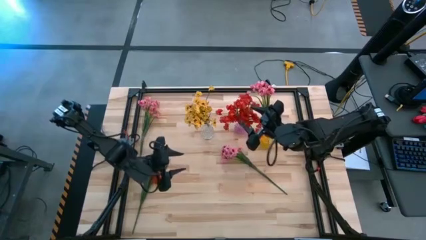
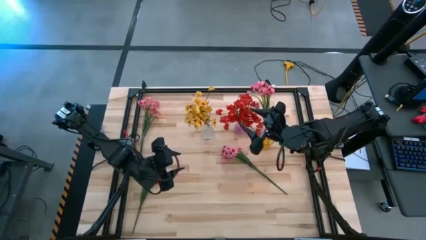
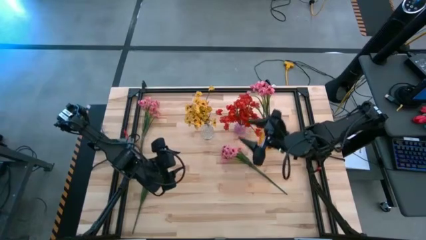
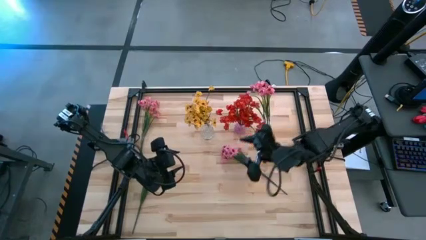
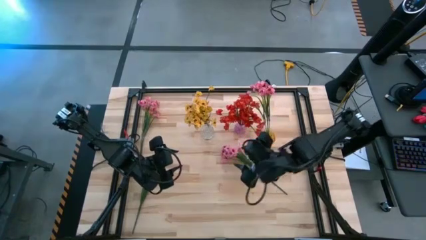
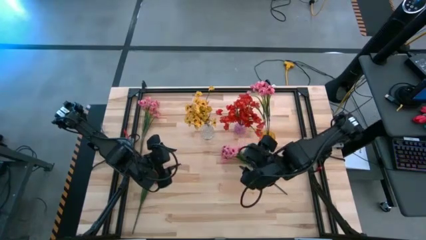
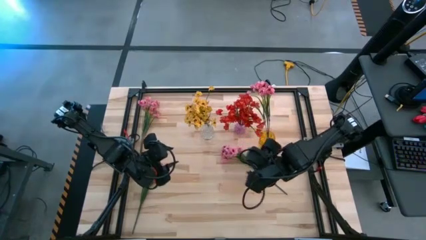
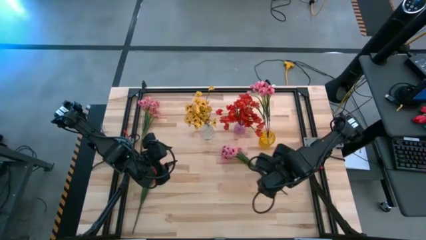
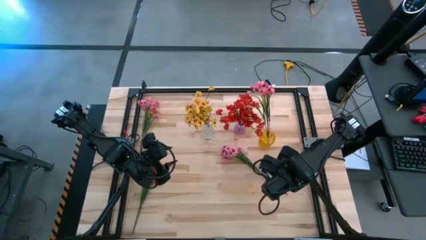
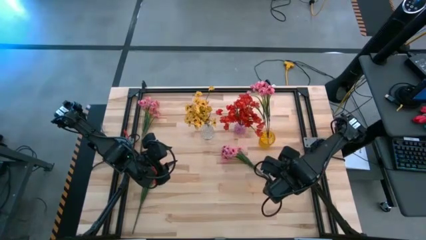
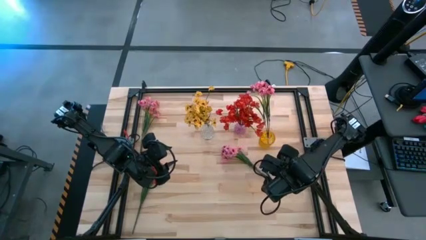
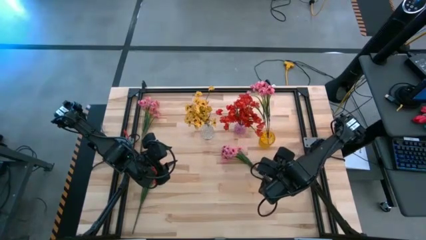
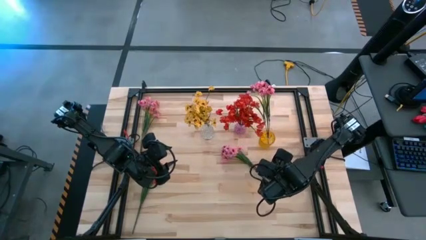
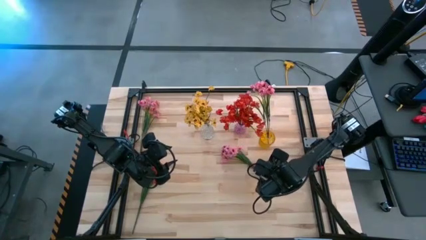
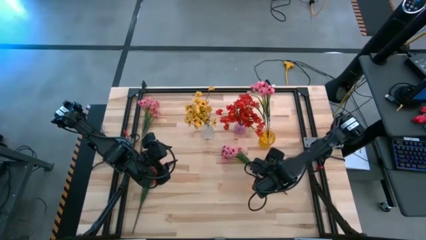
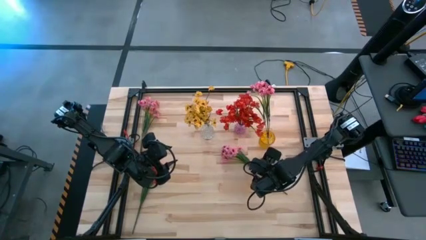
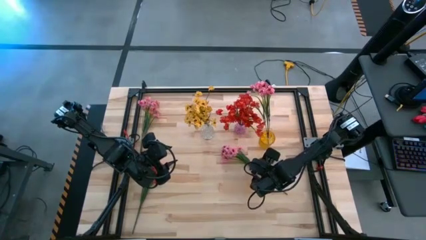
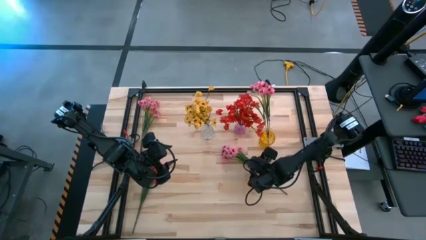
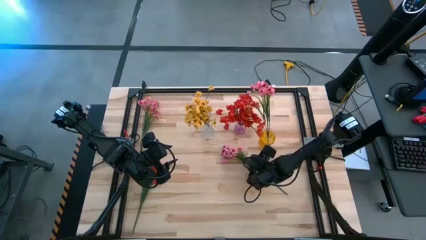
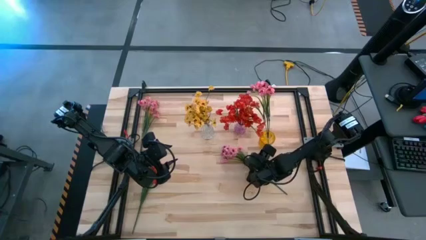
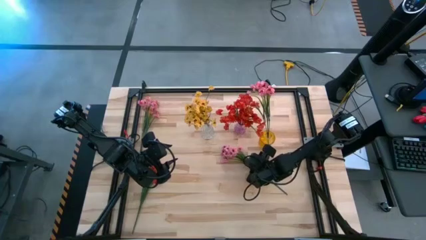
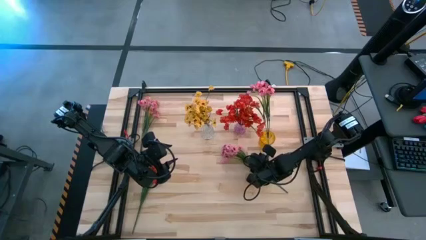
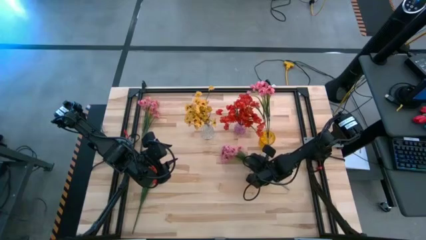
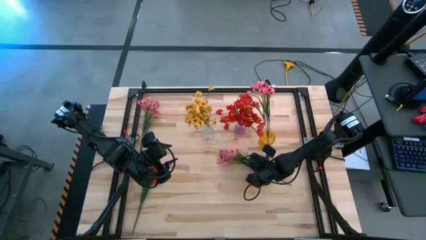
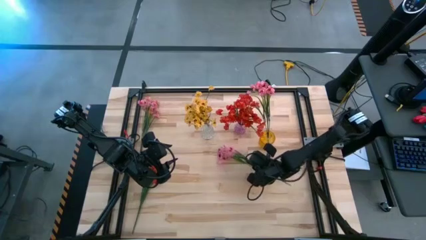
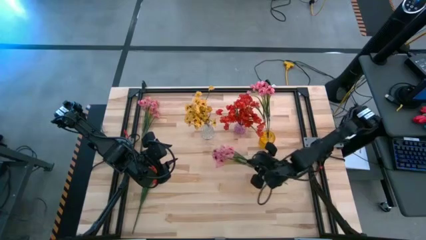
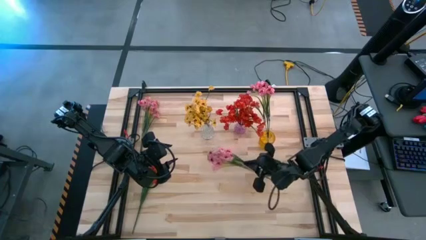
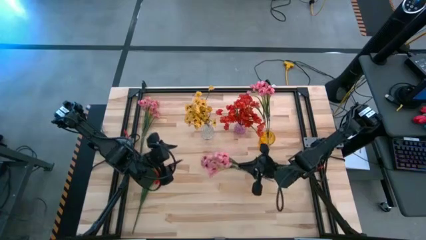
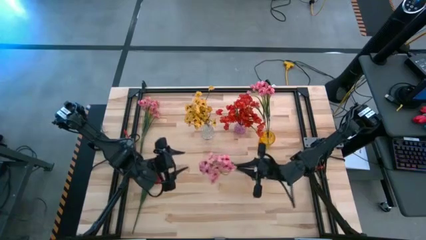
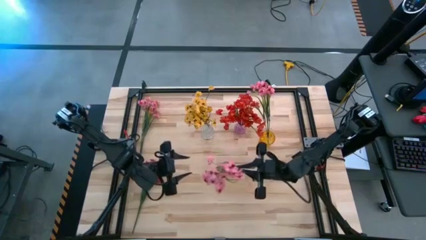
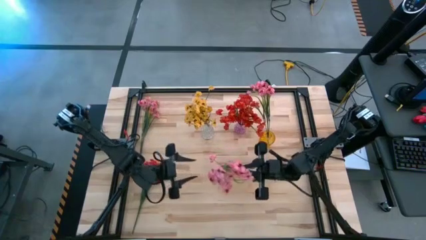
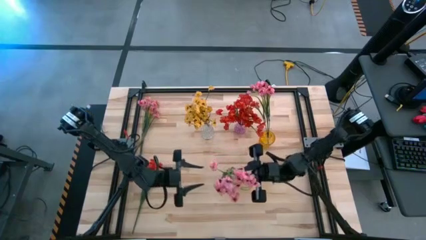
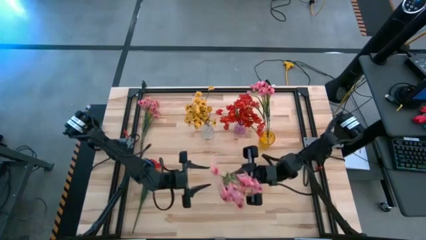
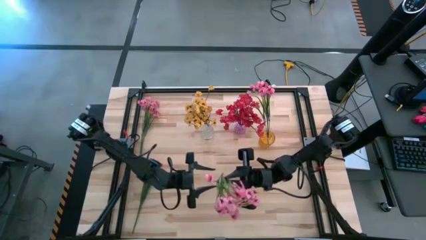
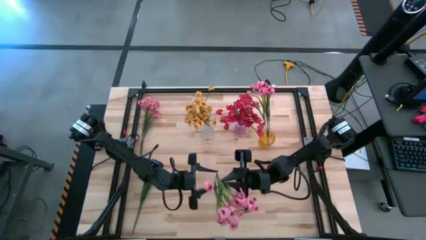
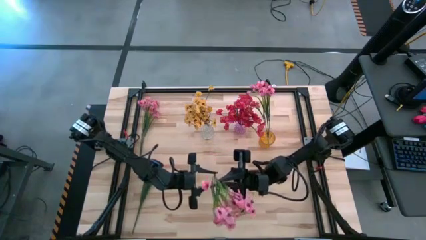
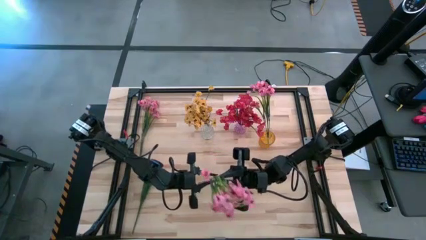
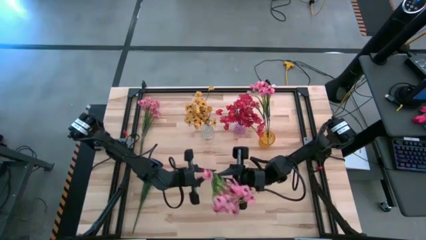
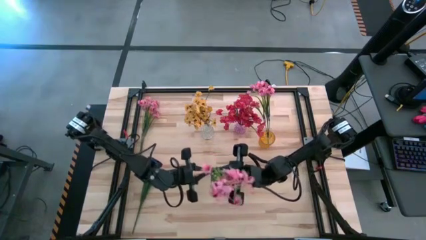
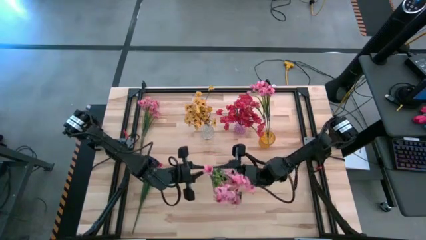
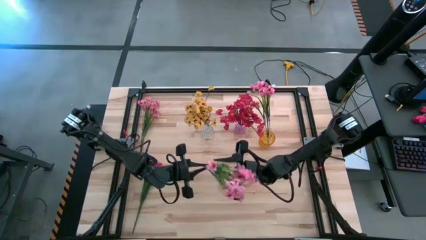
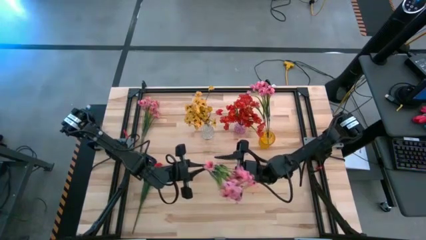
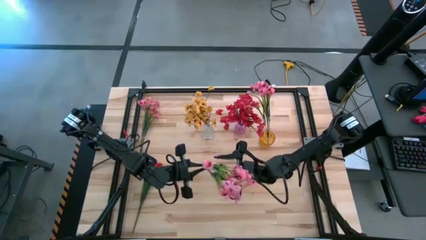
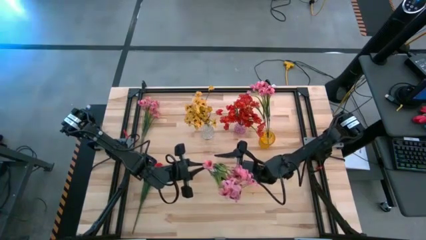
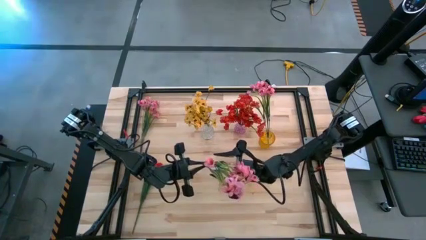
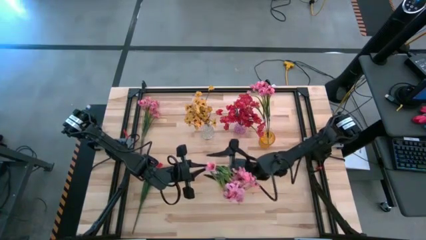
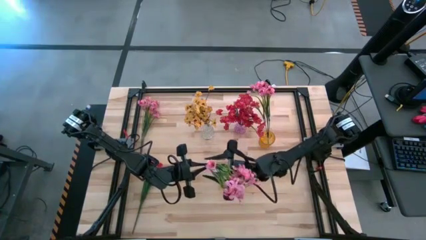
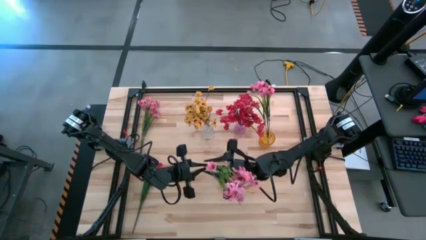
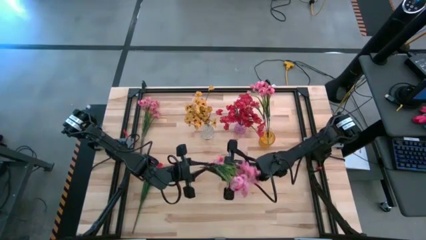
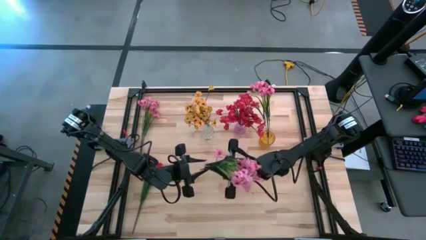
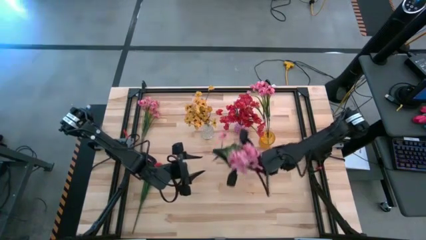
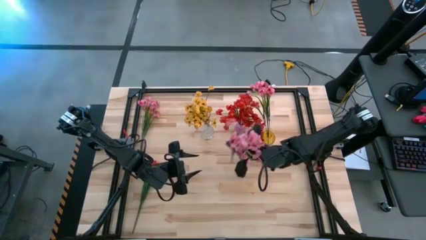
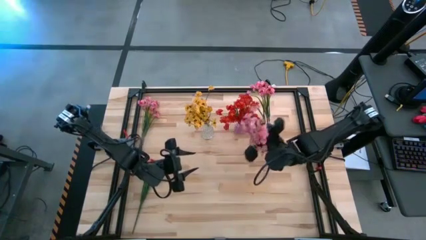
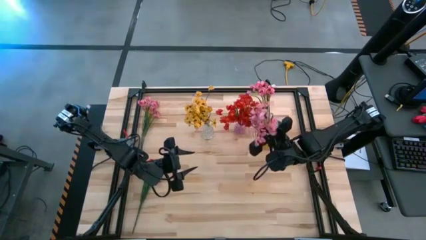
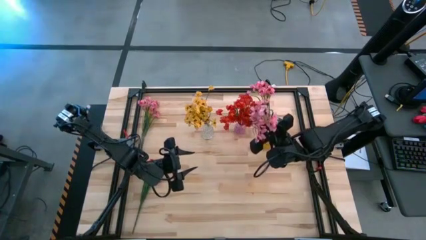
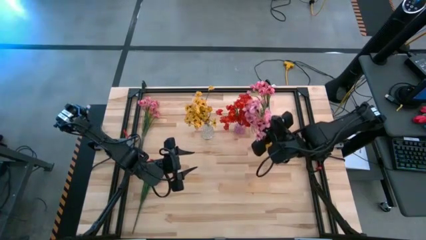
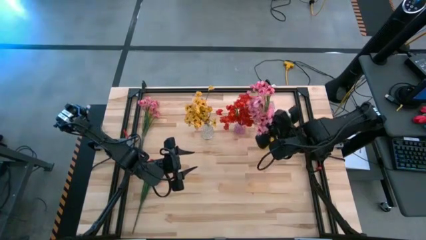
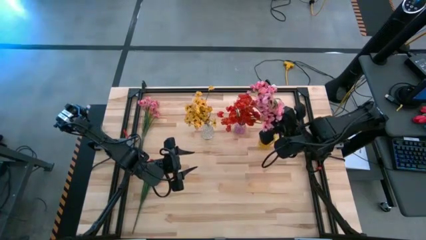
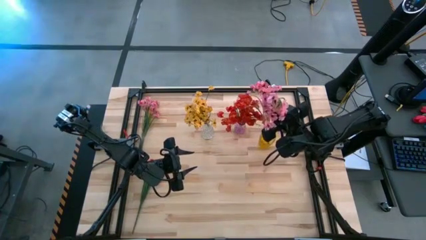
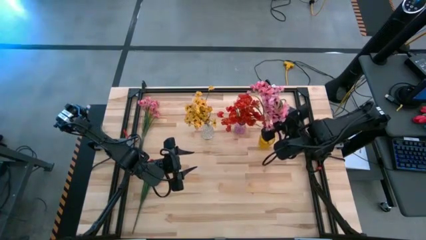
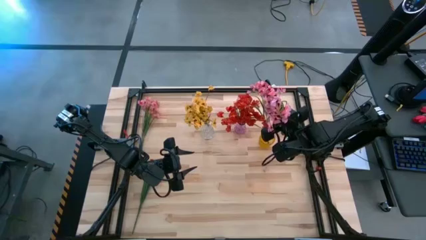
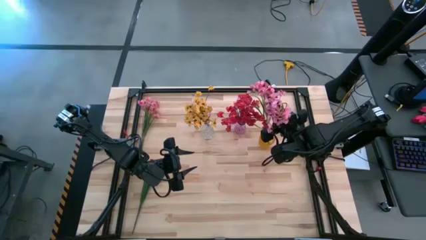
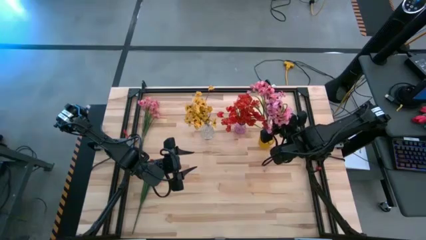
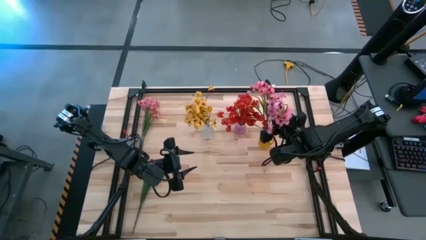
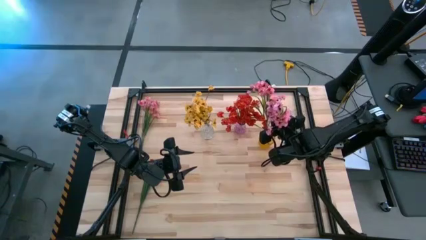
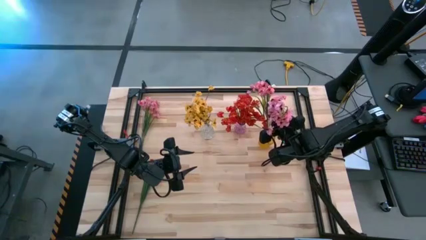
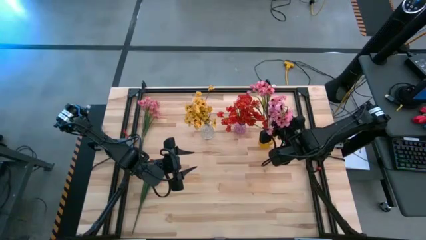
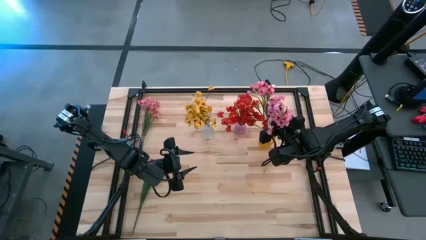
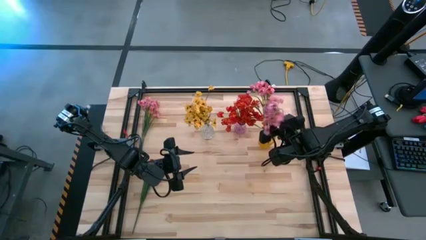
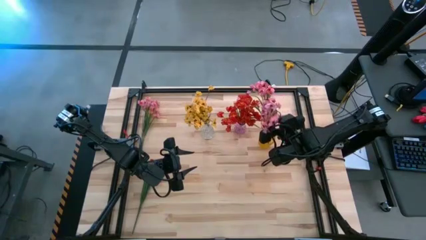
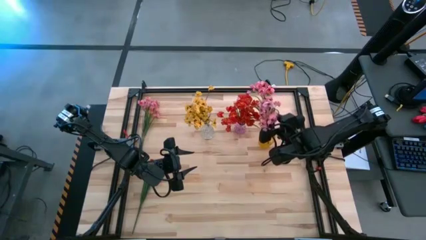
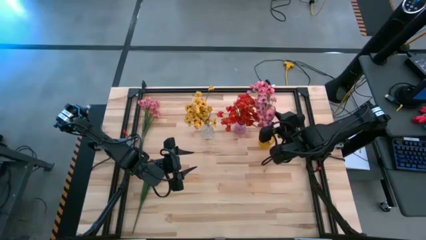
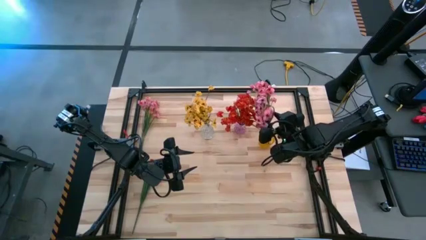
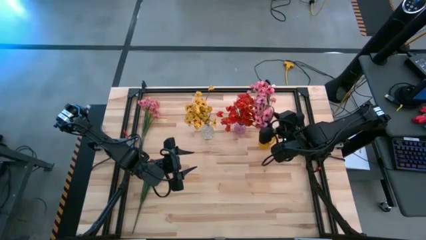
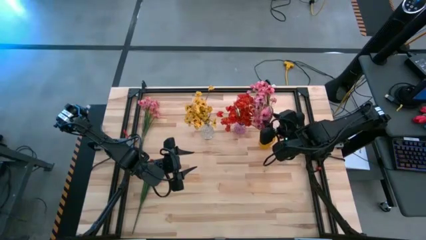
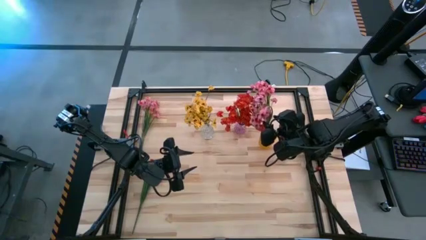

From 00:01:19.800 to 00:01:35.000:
Task: Sort flowers into vase by color
Put the right pink flowers into the yellow vase

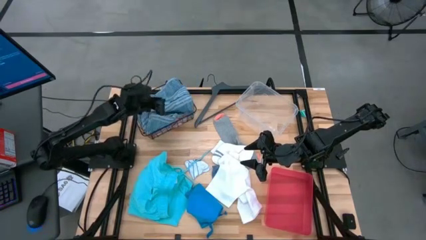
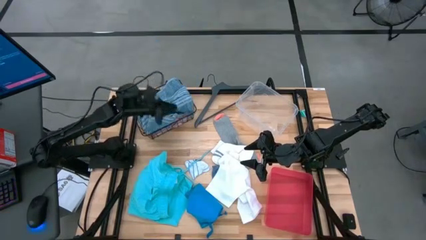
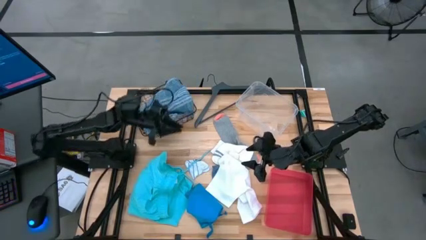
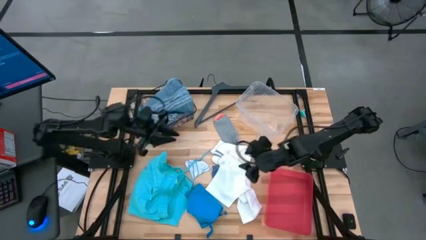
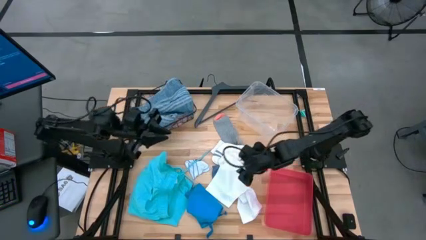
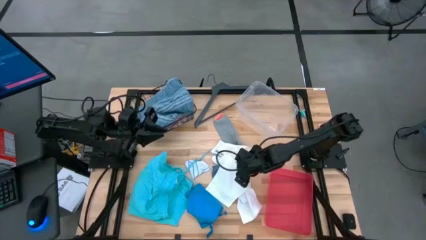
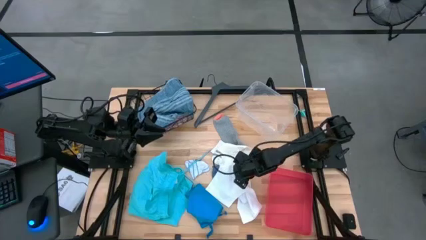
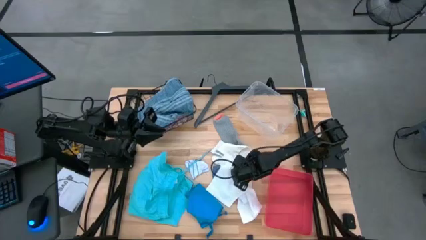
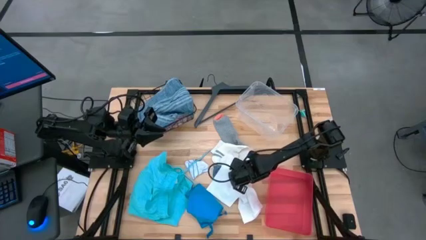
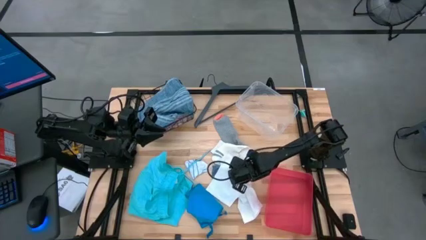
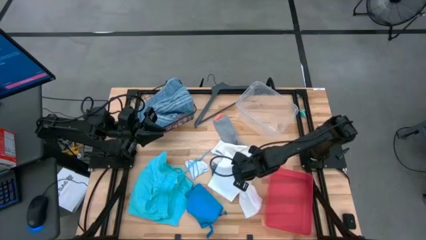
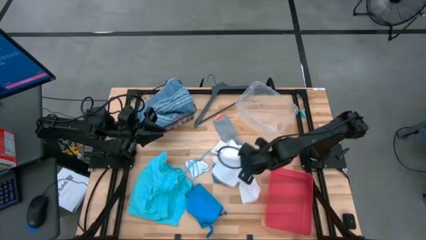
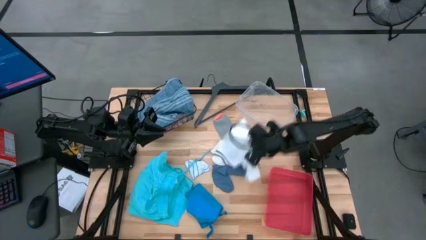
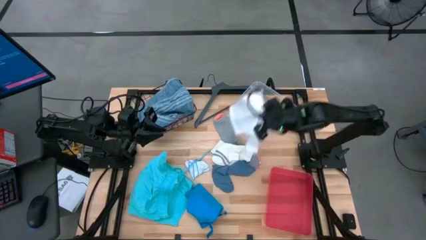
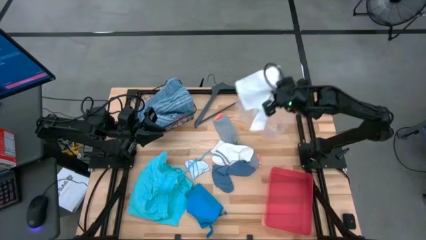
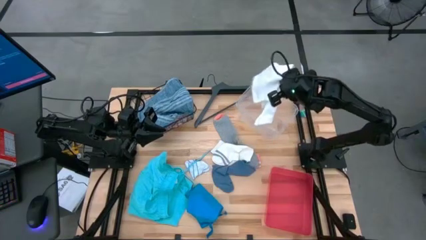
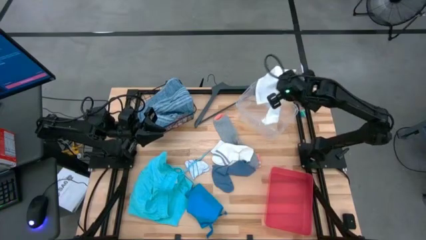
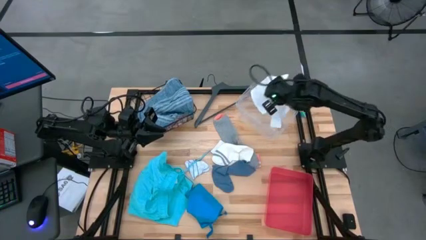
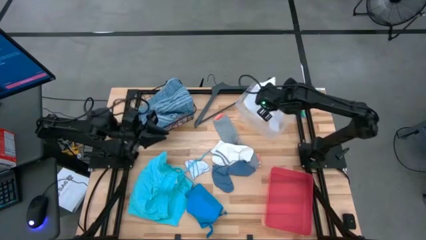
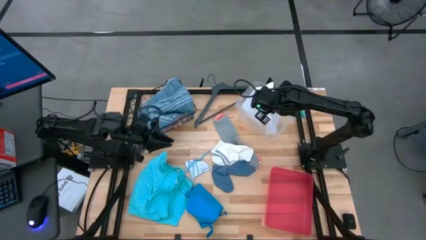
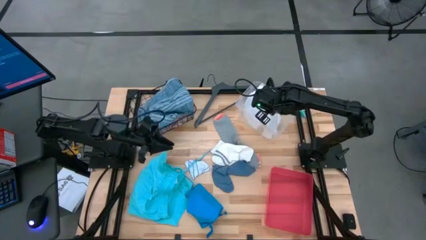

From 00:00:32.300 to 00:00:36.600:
Task: Pick & Place Cloths
Put the white boxers into the transparent bin
